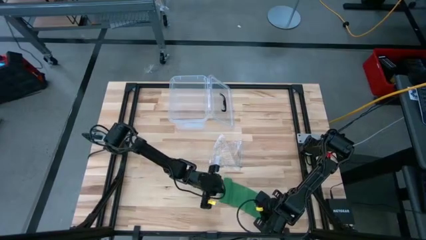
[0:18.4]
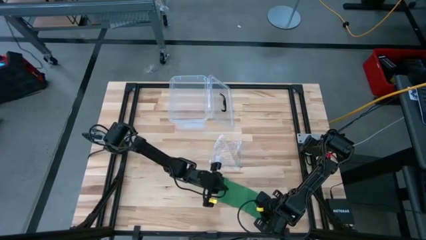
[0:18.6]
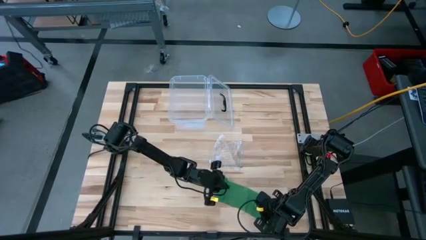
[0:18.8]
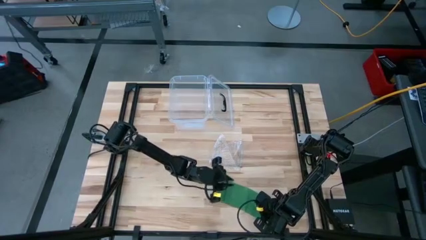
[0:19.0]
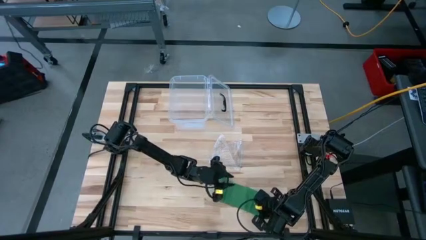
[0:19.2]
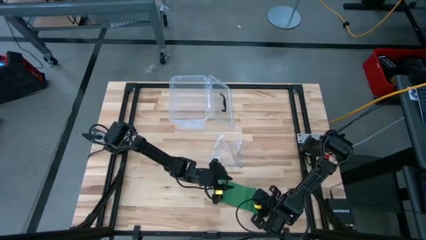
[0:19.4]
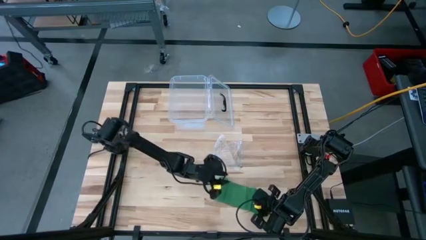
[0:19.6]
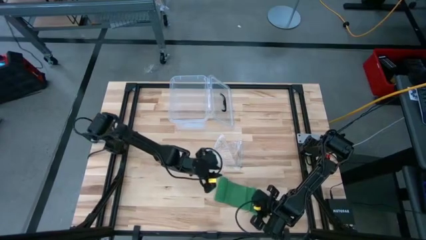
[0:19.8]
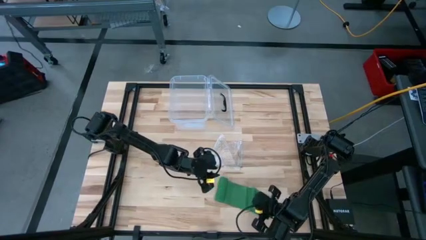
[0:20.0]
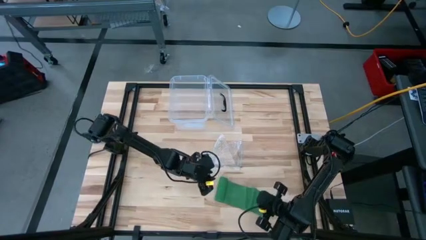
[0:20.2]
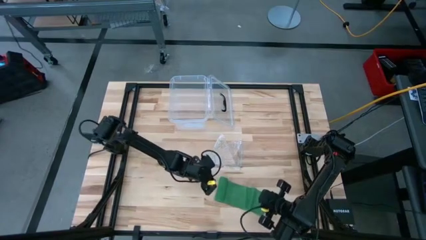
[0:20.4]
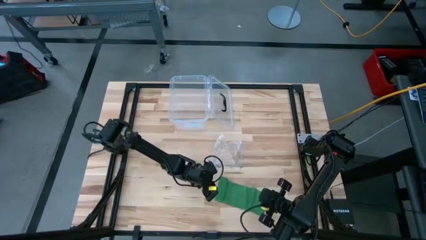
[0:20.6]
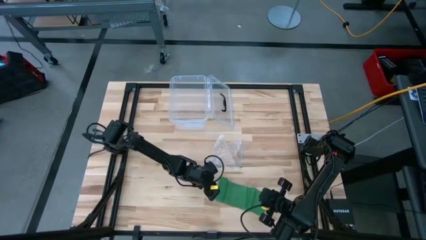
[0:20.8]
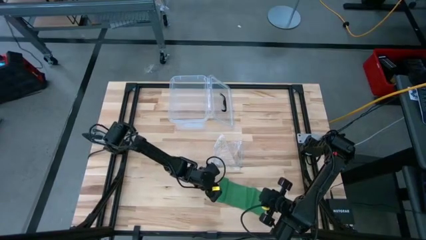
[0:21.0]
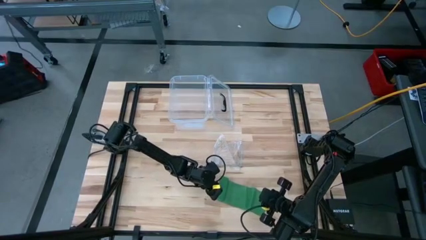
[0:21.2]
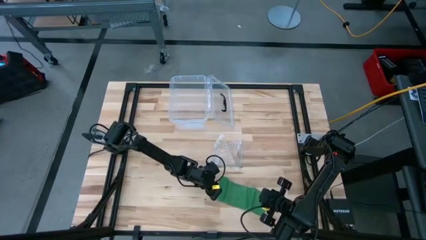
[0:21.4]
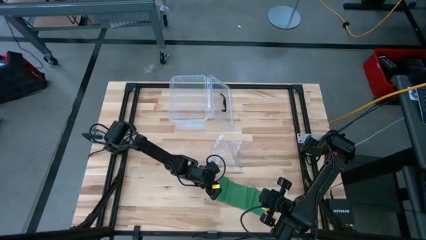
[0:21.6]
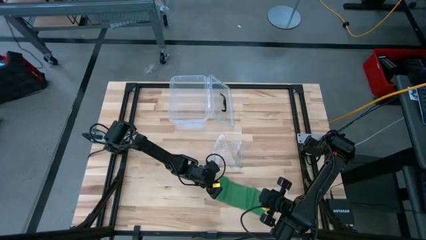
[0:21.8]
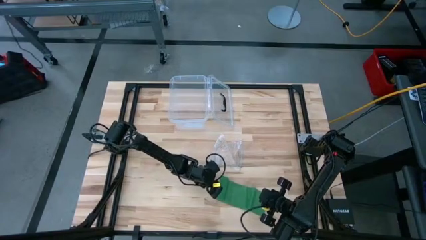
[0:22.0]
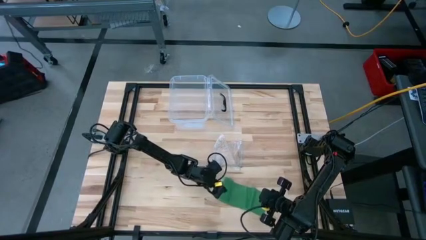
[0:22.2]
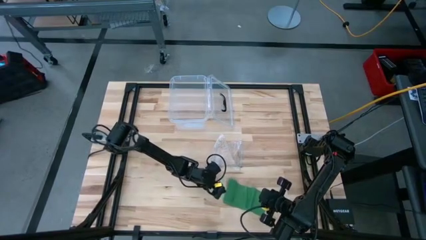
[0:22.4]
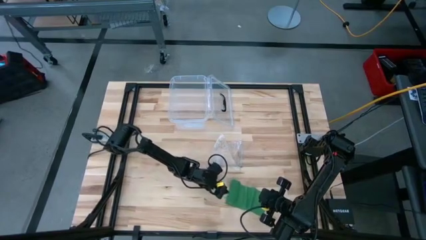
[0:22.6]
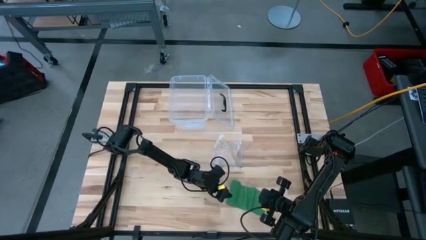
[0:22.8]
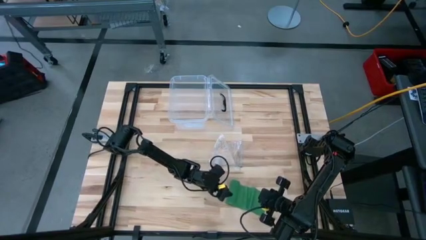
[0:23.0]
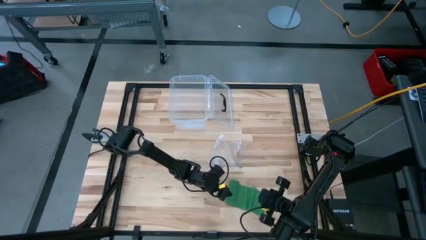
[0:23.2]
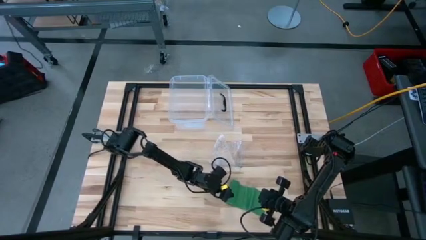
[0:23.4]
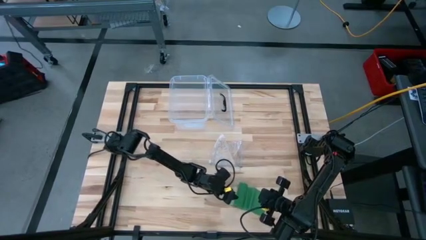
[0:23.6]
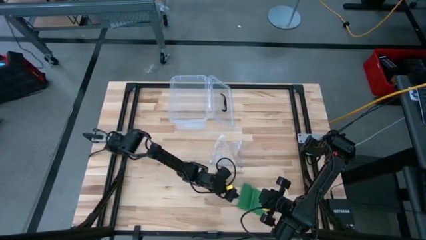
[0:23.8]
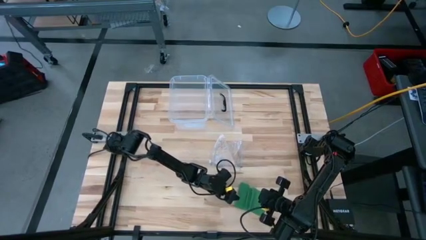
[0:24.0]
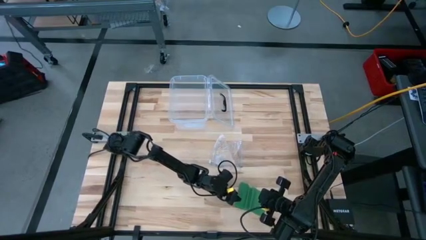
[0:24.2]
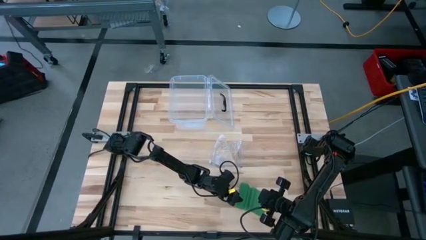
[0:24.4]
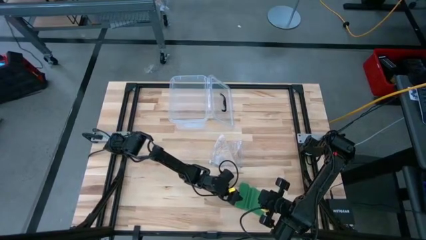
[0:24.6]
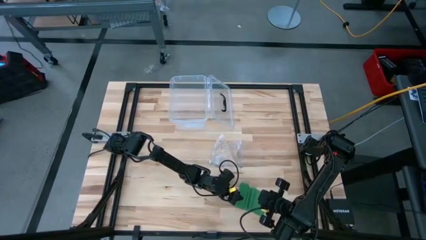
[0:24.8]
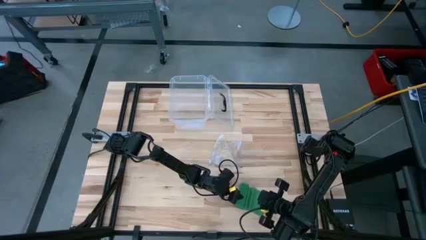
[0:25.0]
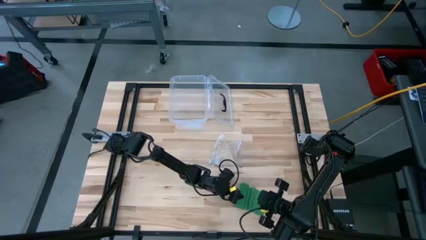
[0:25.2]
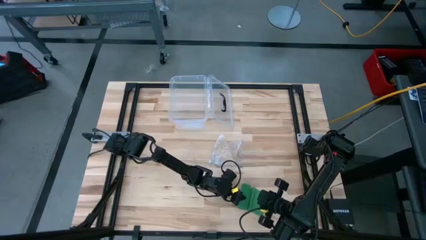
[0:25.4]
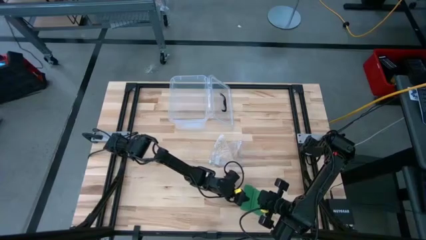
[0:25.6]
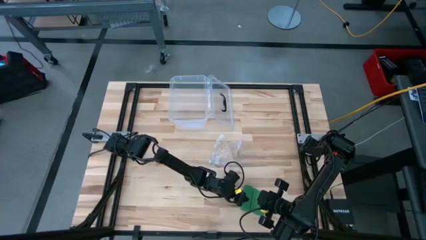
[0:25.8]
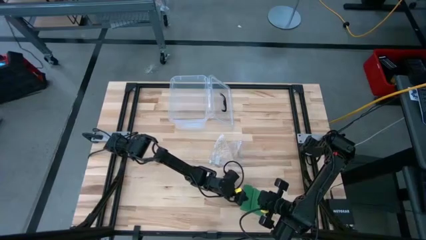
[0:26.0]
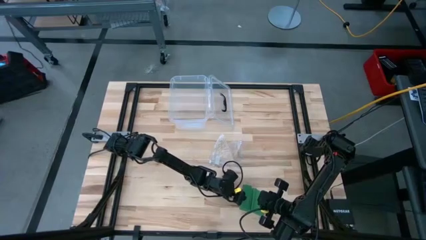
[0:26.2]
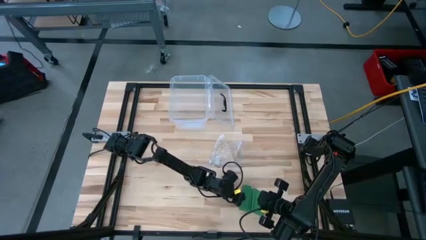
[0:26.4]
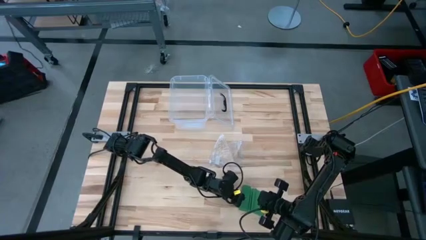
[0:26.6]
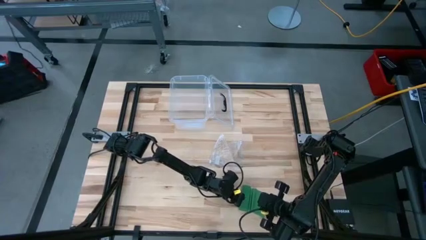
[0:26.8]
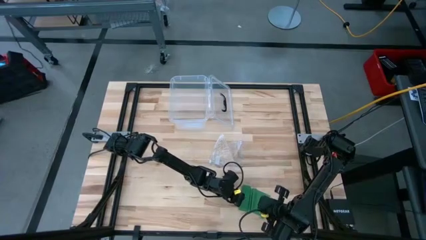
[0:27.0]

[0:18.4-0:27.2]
Task: Roll bandage
Roll the green bandage

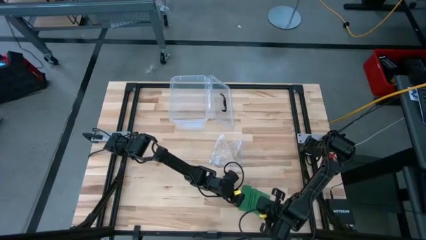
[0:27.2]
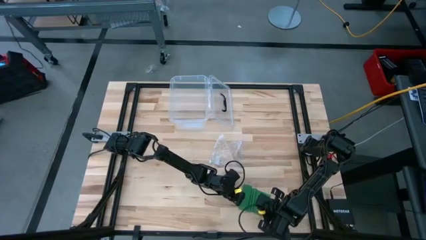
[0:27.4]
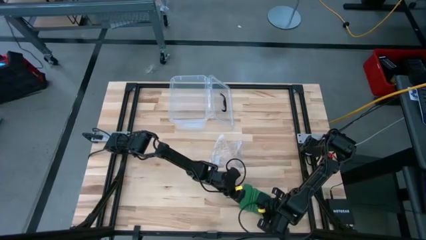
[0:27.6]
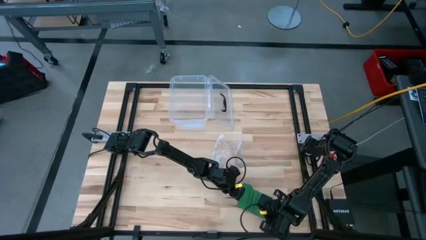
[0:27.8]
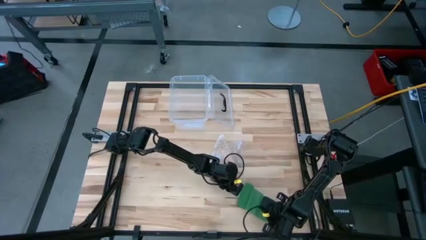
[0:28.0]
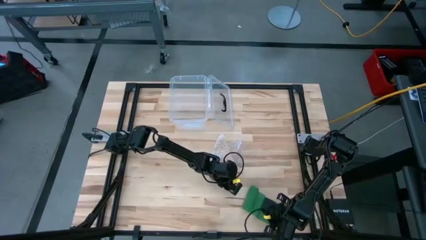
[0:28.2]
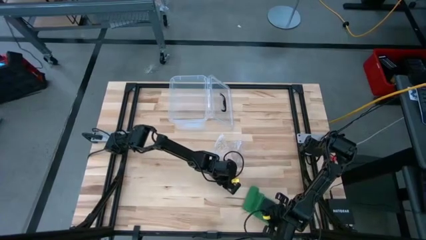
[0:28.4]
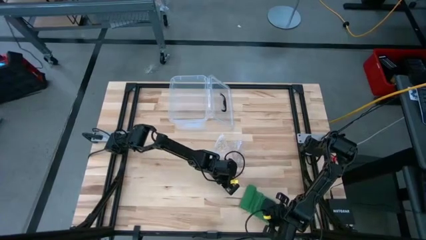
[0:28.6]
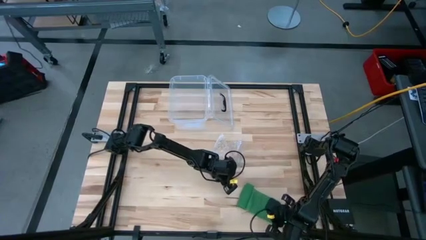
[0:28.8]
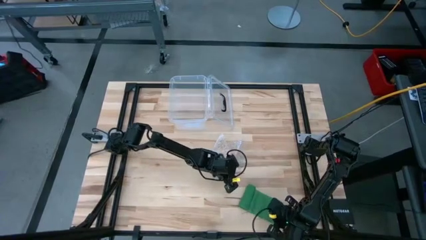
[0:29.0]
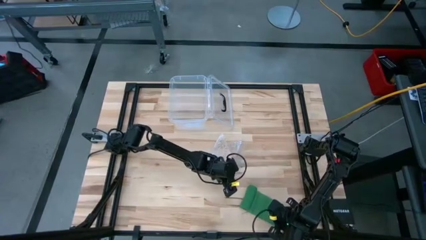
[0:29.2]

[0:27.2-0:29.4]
Roll the green bandage

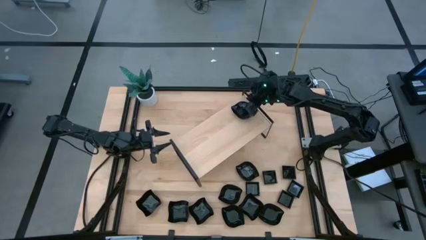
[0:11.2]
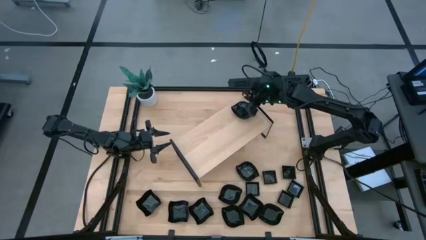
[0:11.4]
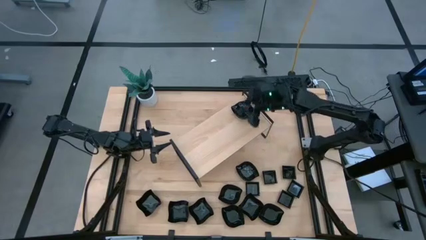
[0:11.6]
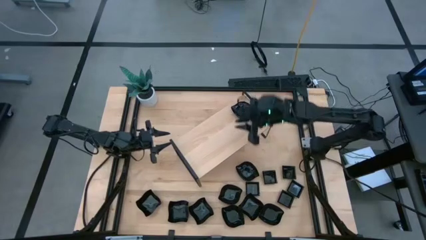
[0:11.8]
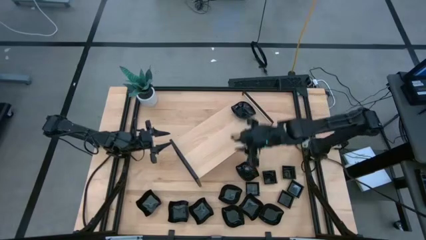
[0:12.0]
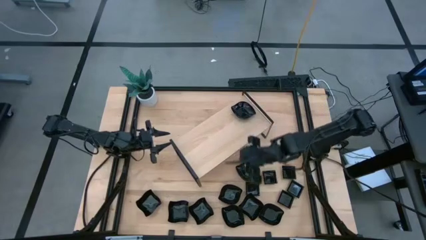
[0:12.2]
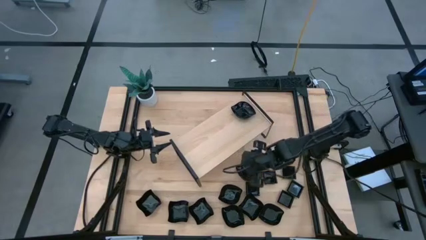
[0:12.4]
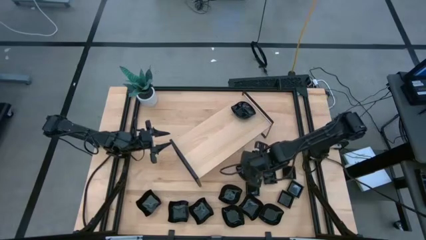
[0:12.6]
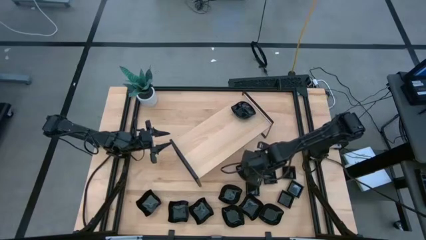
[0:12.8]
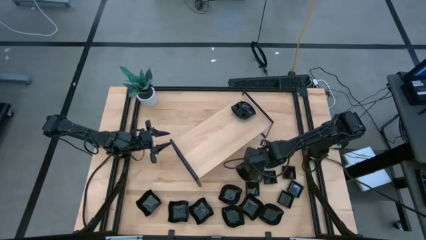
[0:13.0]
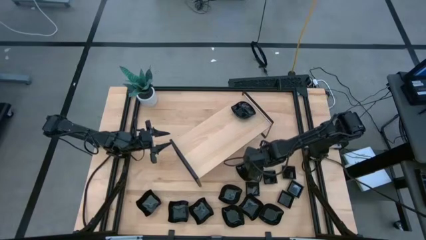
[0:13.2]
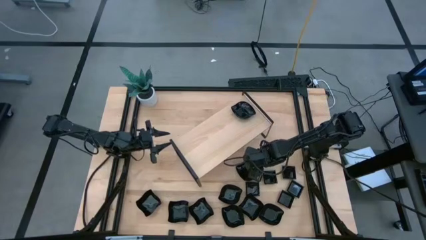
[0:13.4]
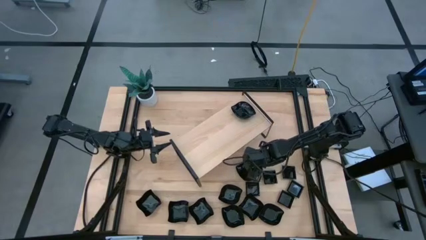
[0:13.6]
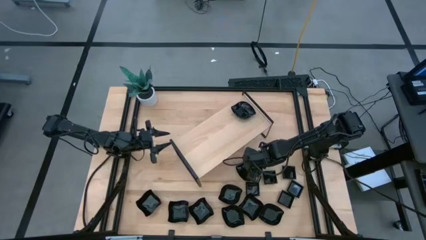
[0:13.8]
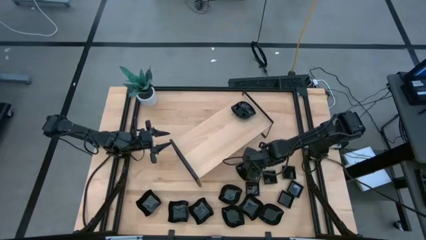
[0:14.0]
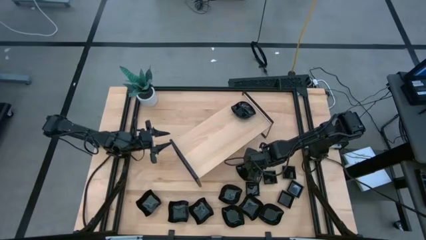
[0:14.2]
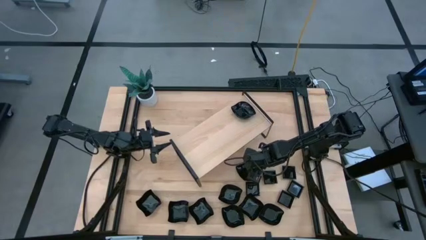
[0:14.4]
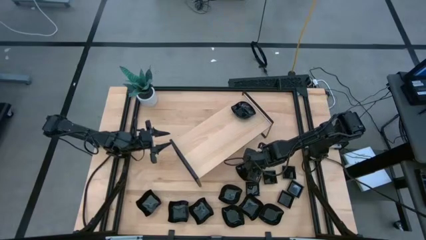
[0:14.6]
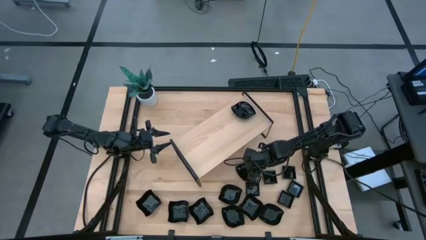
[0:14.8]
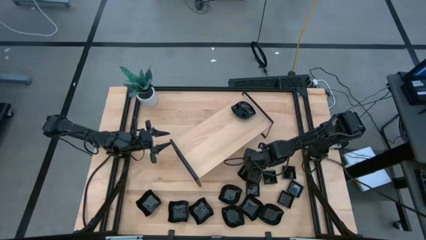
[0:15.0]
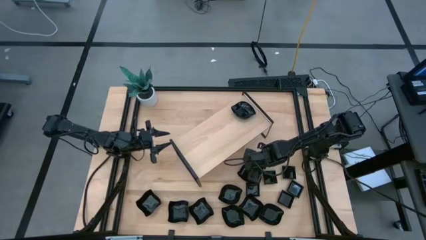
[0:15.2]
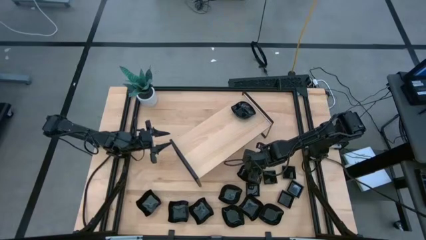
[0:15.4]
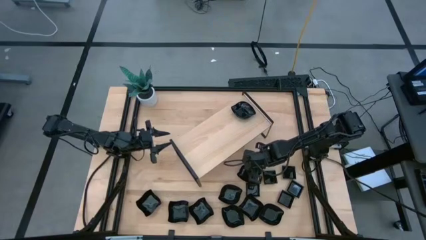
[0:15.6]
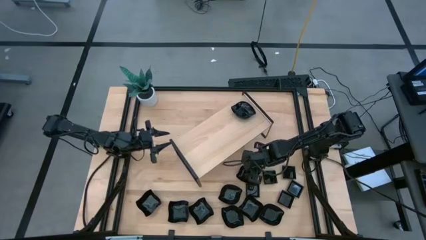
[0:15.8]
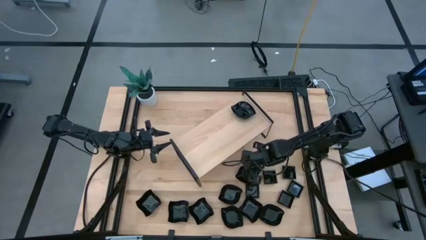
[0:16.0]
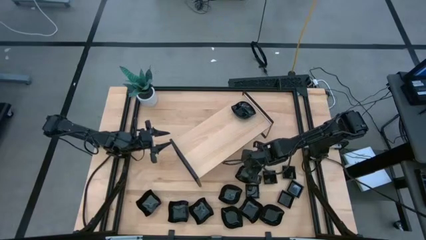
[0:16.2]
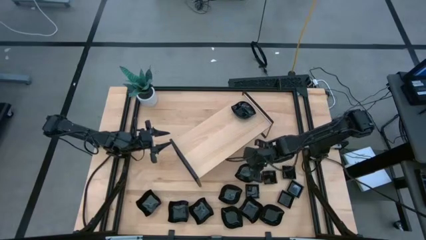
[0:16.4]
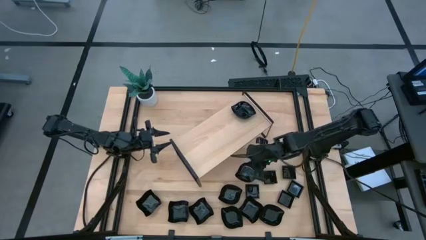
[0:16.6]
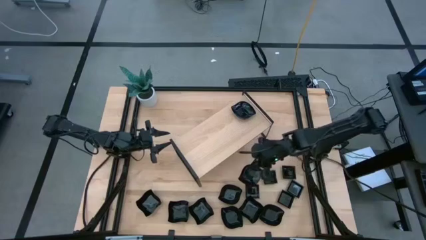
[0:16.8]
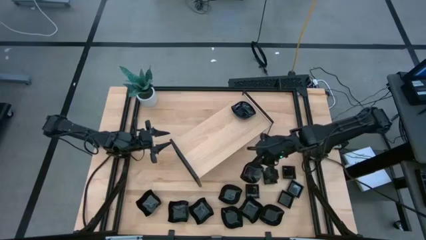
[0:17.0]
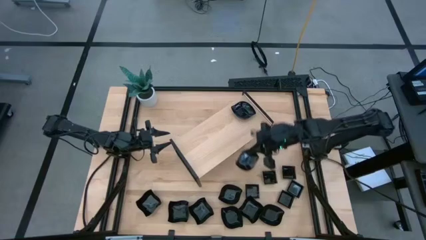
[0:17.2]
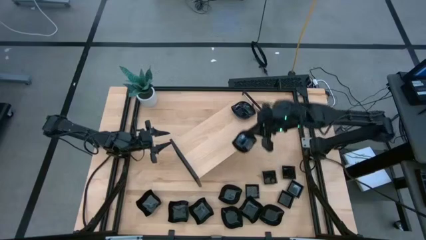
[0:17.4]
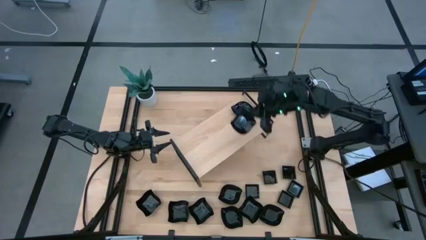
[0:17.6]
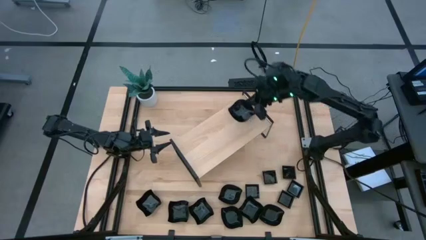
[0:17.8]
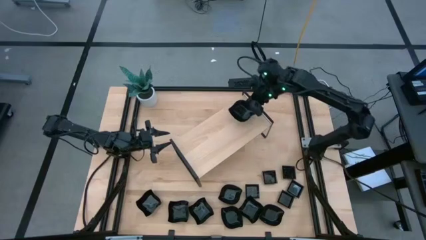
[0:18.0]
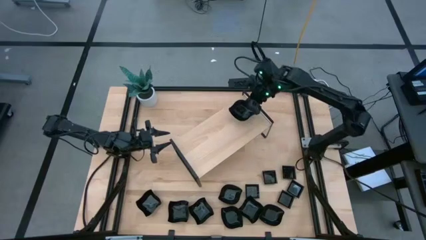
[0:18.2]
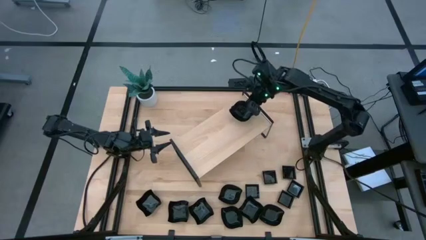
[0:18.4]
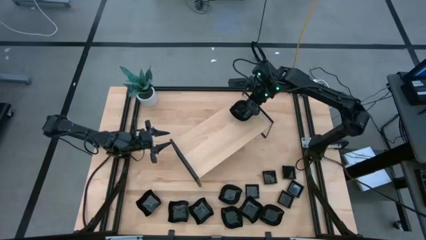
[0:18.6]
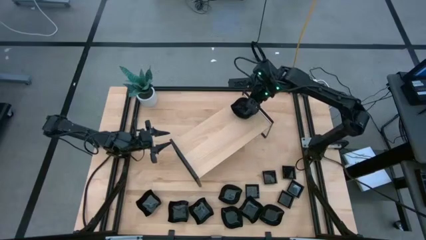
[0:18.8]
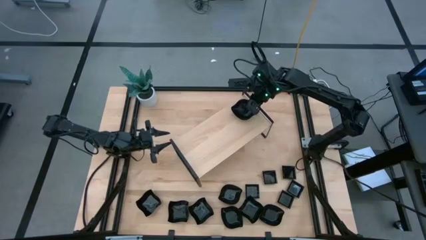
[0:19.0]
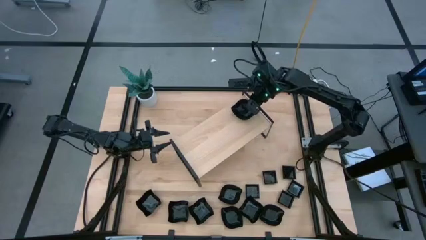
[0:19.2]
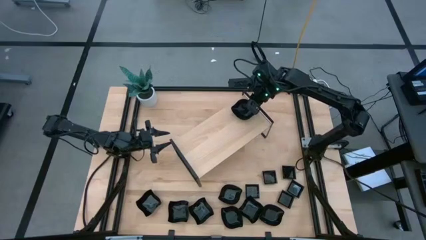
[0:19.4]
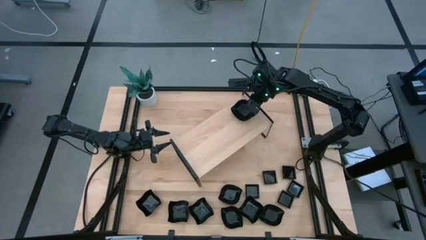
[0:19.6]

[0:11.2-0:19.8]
Task: Pick & Place Mini shaped plates
Stack the leaf shaped plate on top of the other leaf shaped plate on the shelf
